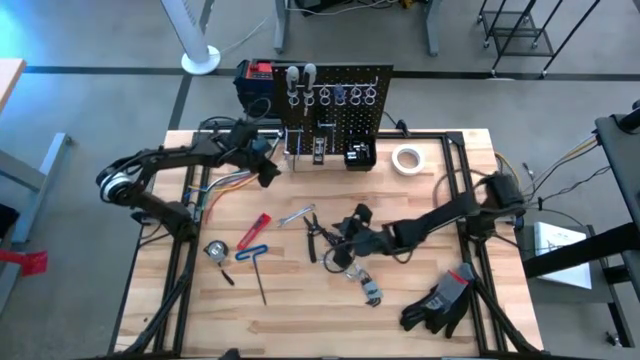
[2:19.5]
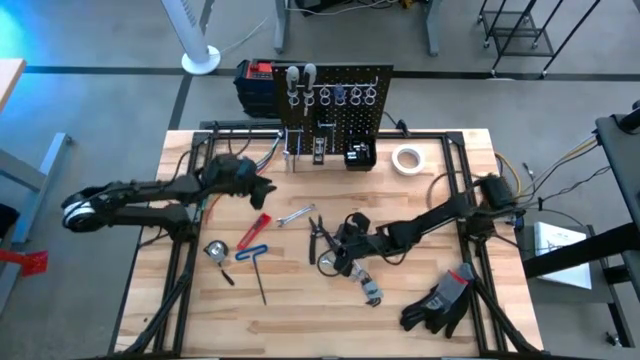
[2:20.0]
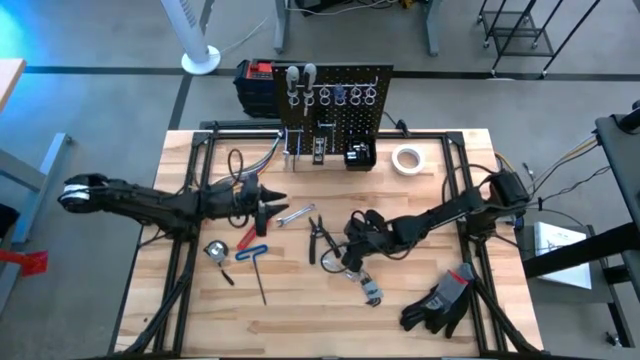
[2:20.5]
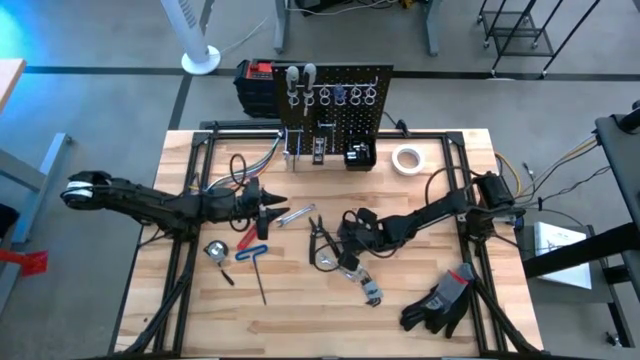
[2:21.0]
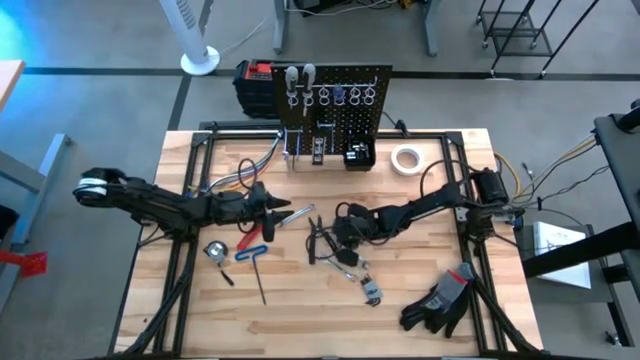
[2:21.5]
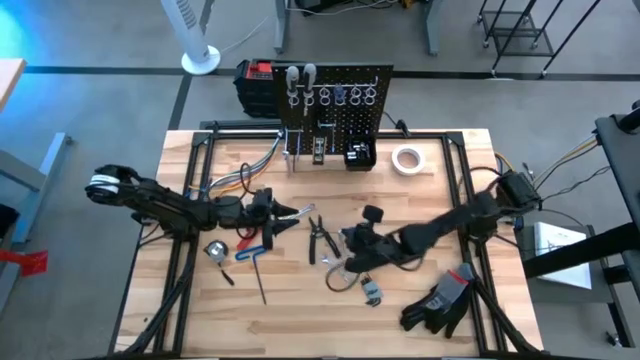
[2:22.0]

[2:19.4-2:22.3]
Task: Hang tools onto peg board
Hang the wrench on the peg board

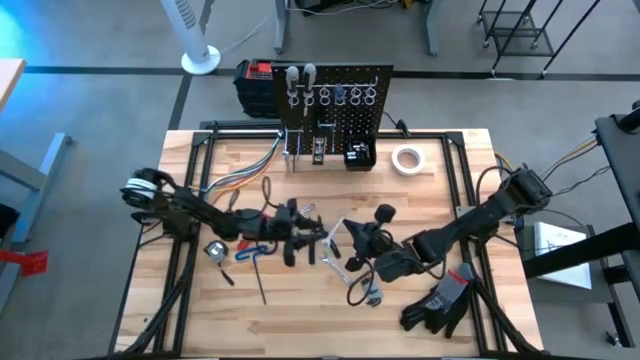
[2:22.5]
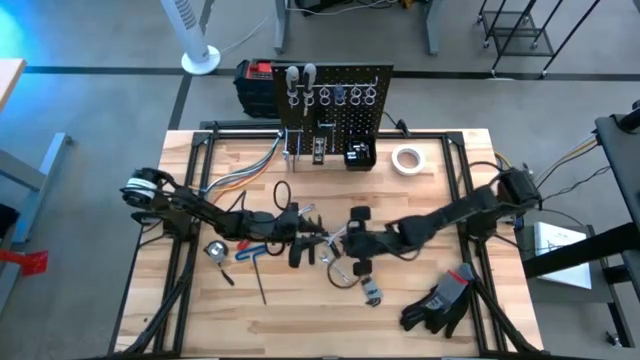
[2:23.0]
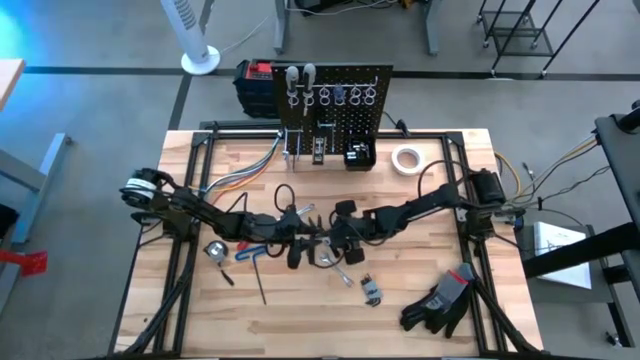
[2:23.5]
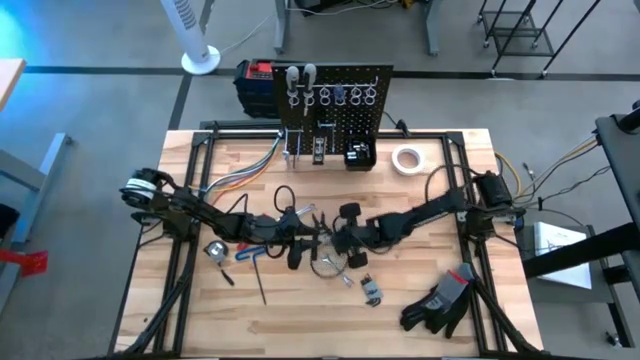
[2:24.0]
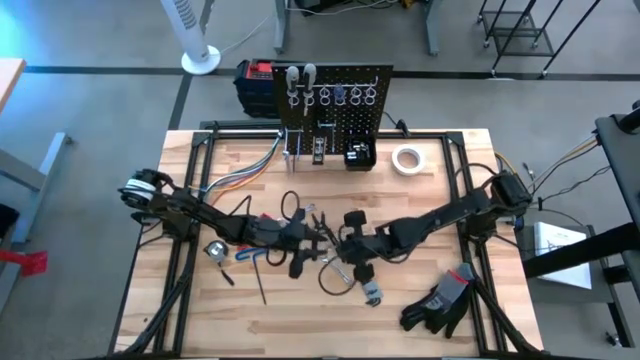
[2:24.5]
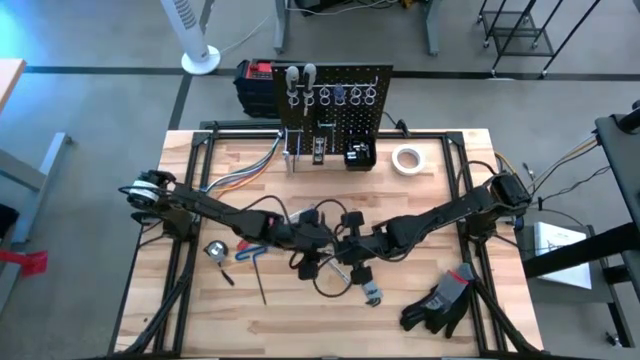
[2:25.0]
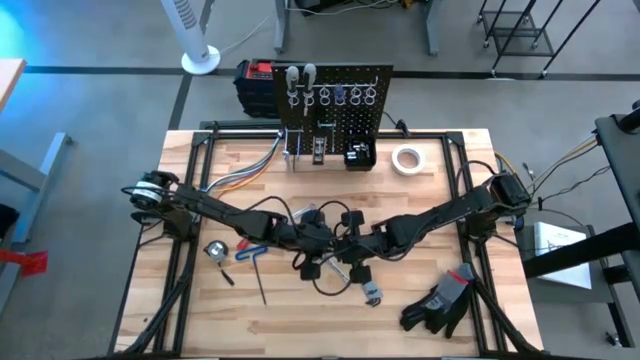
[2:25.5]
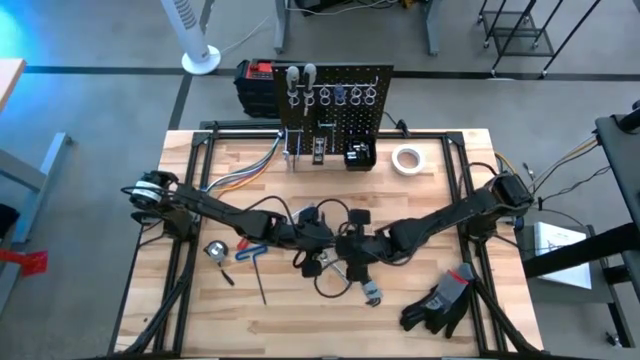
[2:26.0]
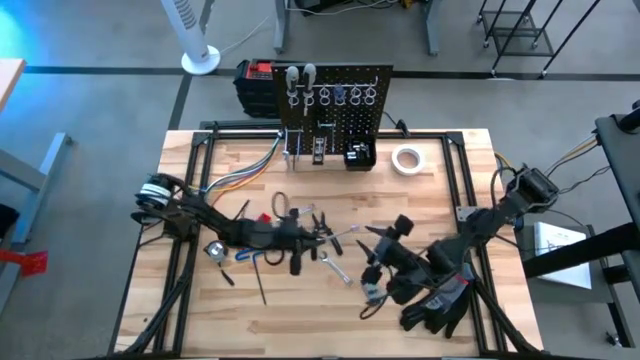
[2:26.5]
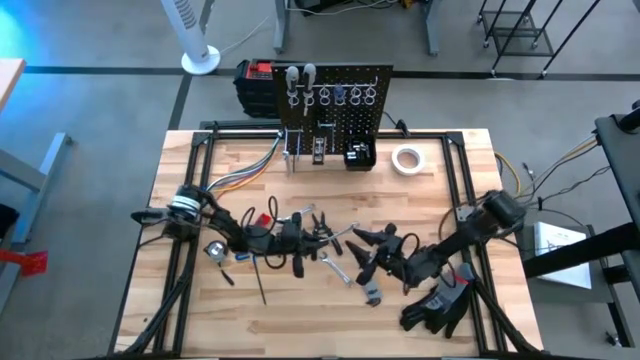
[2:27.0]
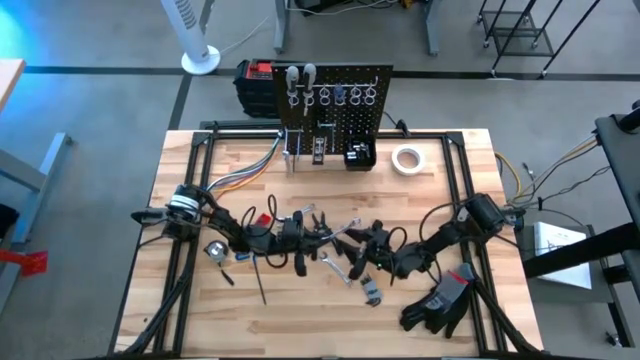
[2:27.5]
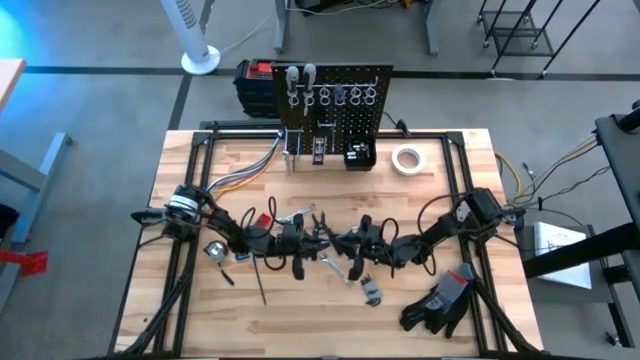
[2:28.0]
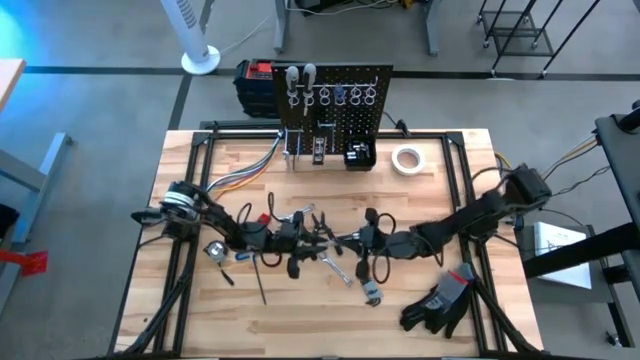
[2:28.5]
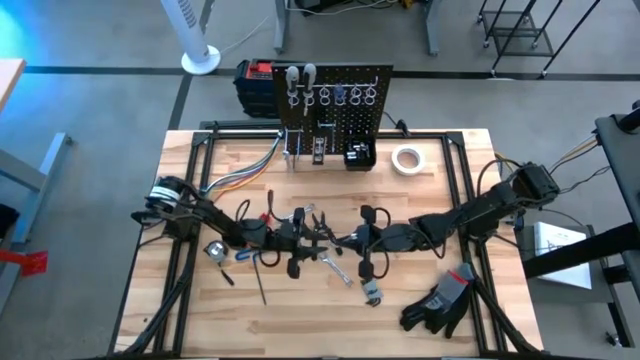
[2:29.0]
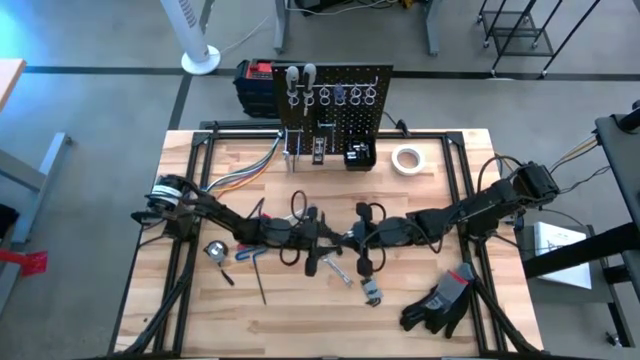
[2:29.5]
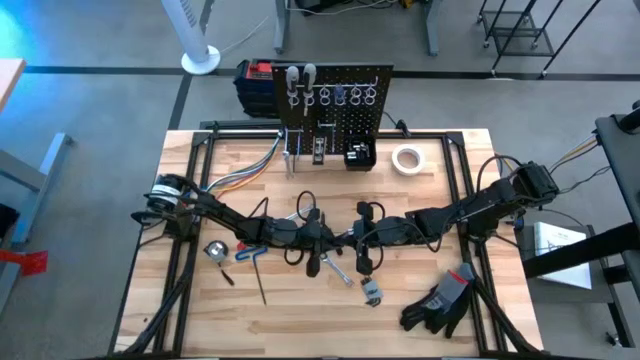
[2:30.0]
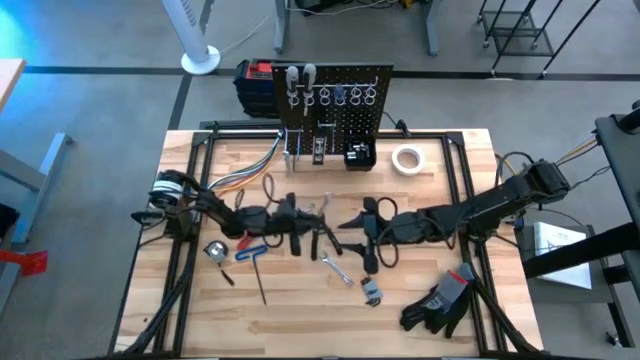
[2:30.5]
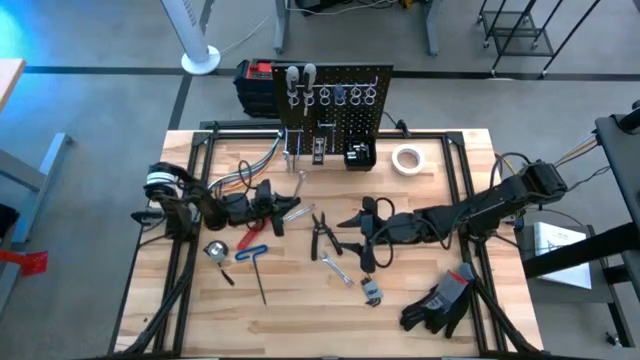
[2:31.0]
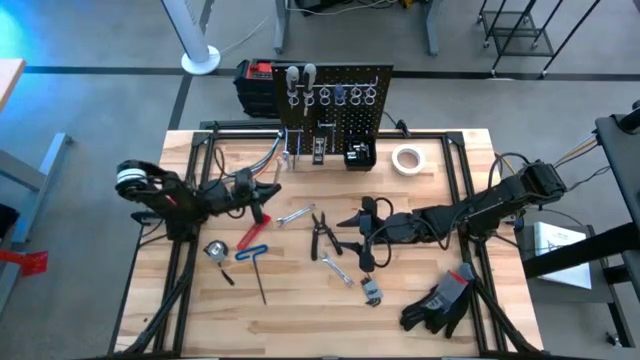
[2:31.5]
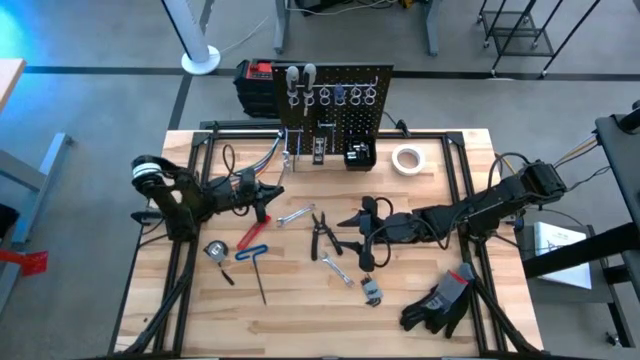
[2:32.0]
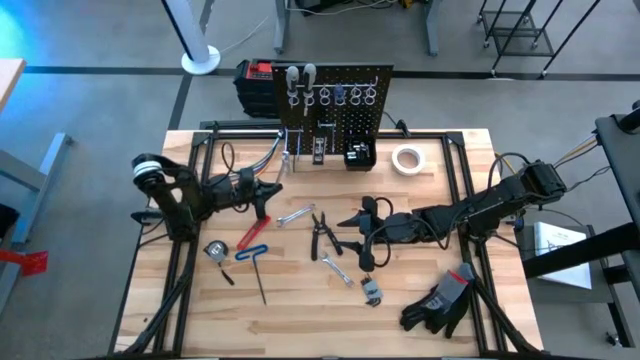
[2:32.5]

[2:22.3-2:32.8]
Hang the wrench on the peg board

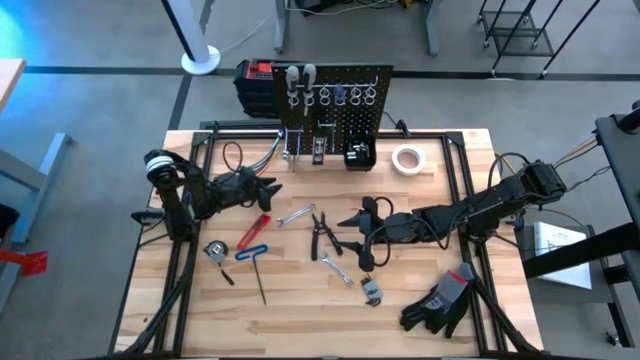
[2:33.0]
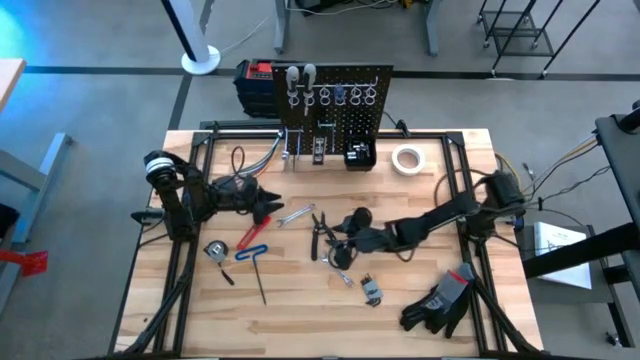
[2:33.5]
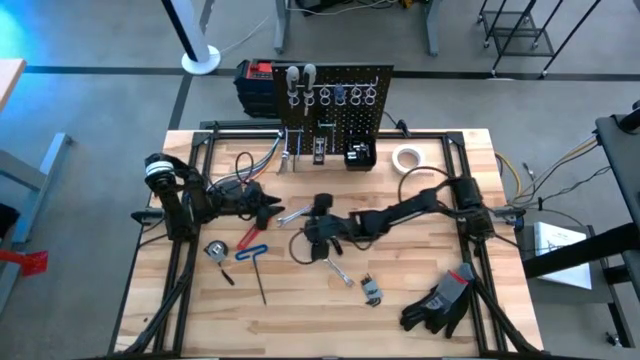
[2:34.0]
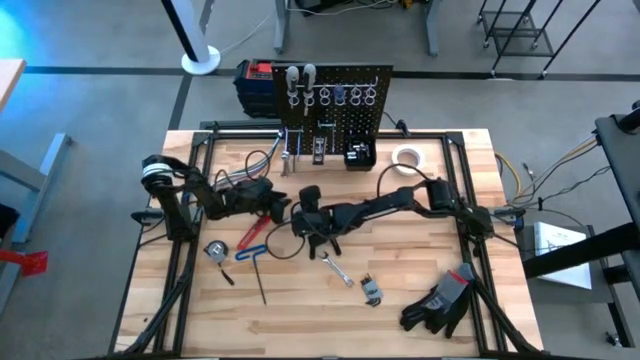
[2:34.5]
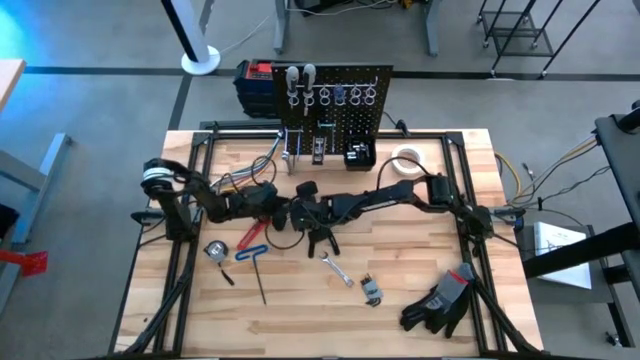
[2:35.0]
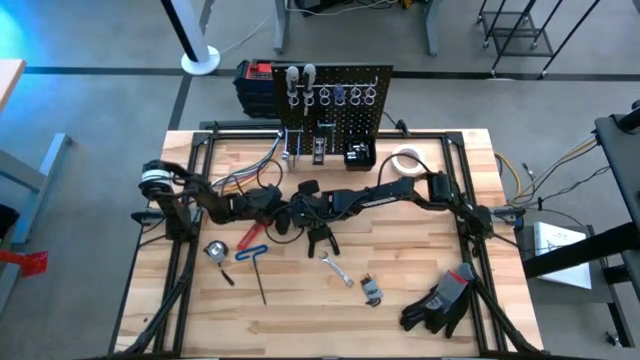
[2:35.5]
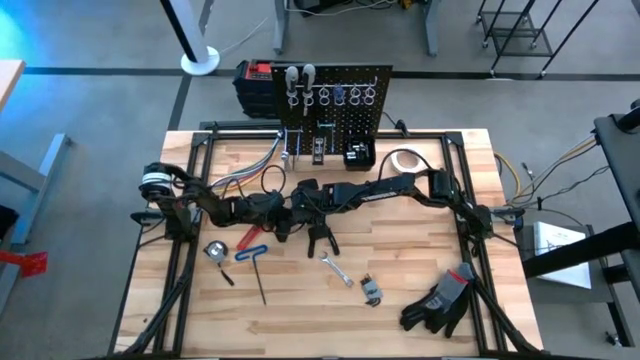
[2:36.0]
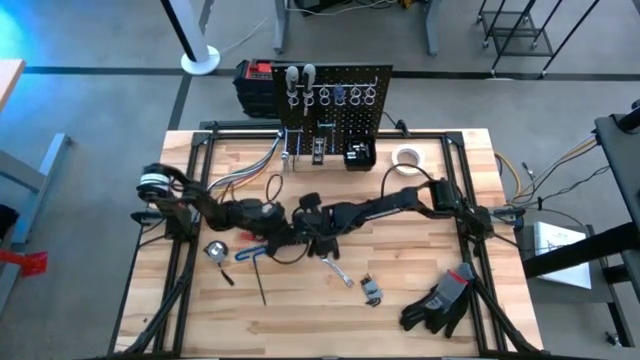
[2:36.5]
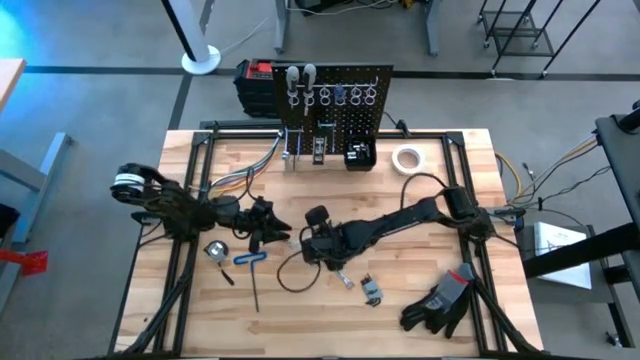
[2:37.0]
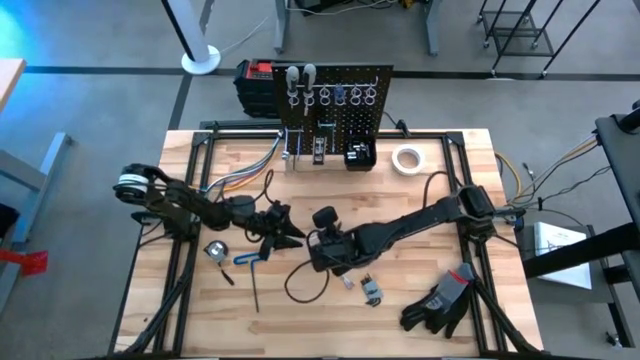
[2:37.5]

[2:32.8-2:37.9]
Hang the wrench on the peg board

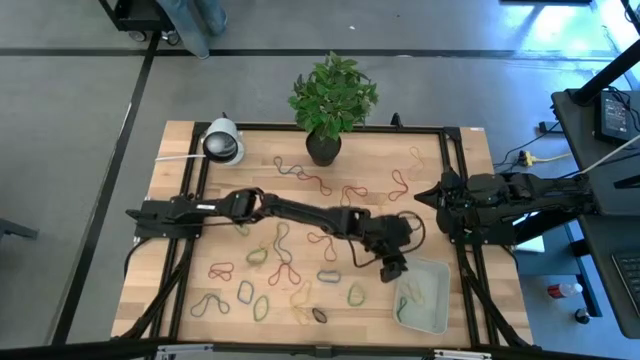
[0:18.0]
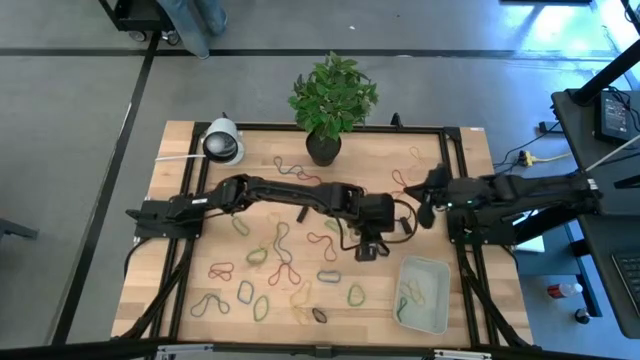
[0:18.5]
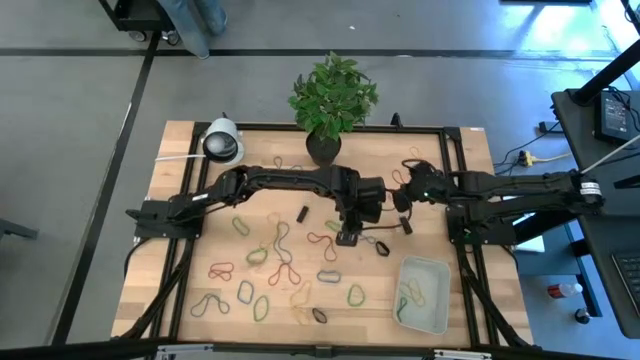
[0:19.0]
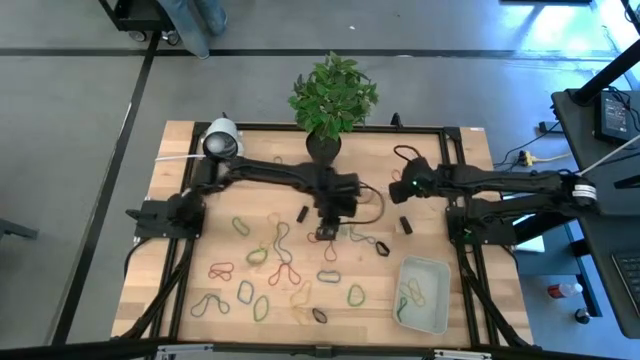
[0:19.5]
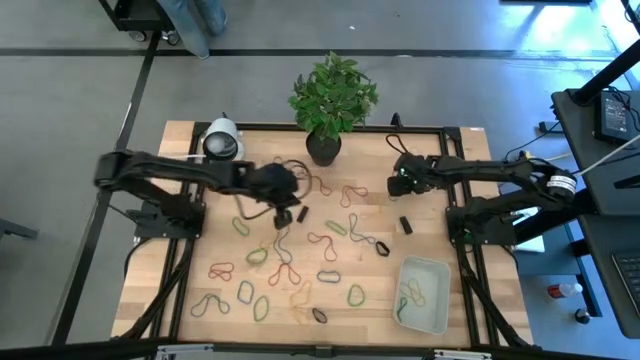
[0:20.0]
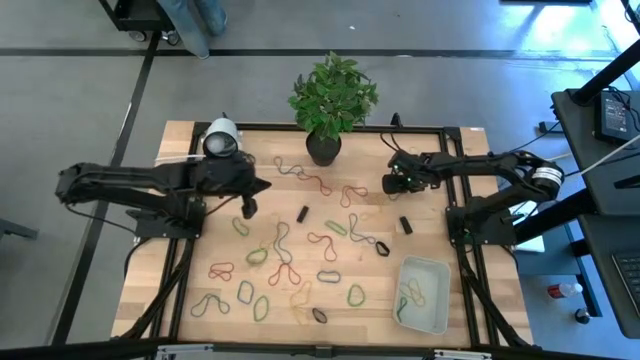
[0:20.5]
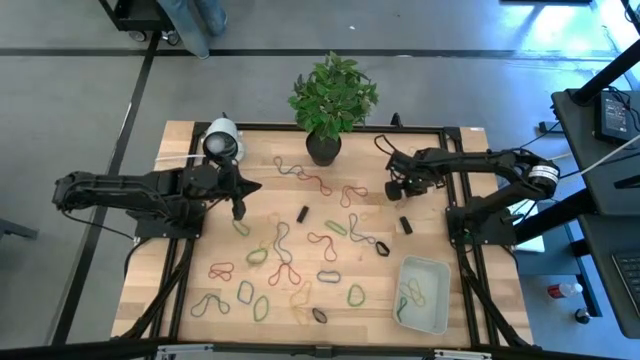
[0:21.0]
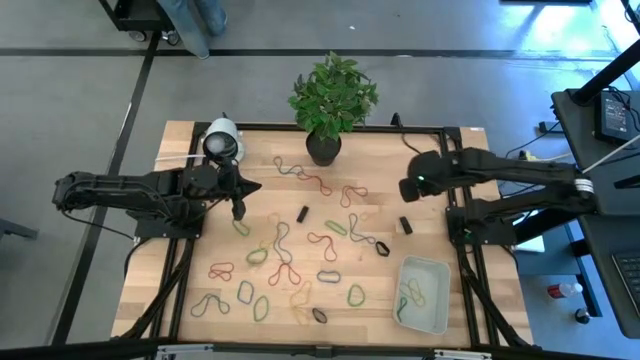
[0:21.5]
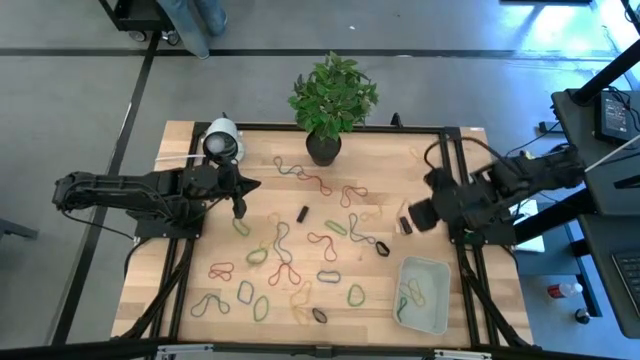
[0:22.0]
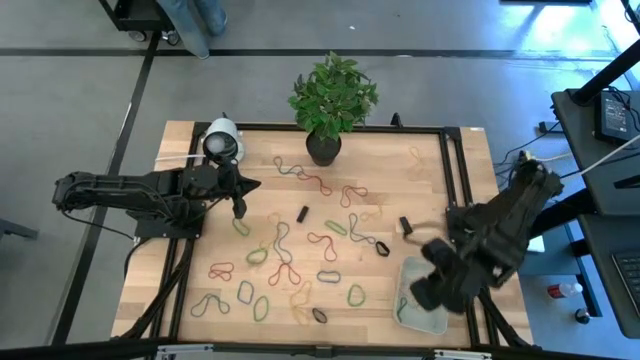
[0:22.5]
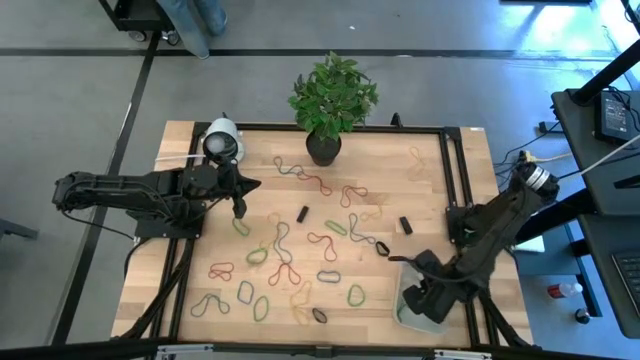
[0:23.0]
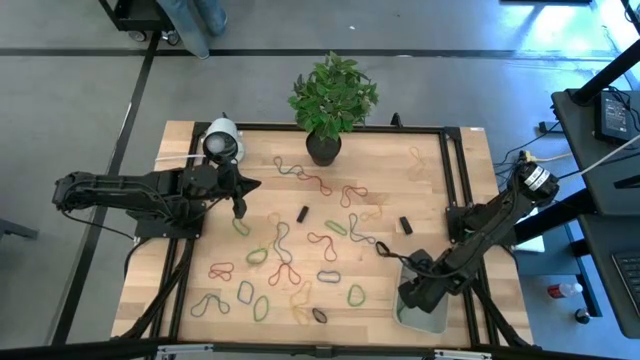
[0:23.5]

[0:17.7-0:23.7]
Task: Pick and place rubber bands into bin
Put the red rubber band into the gray bin
